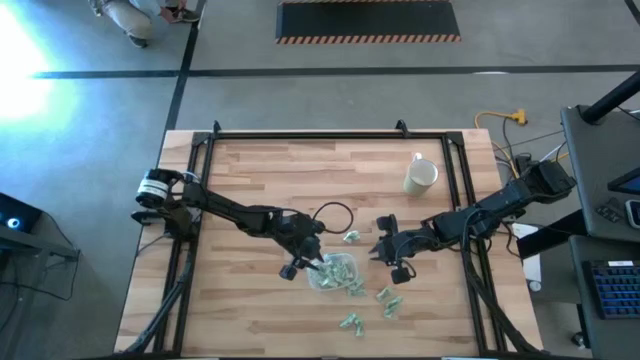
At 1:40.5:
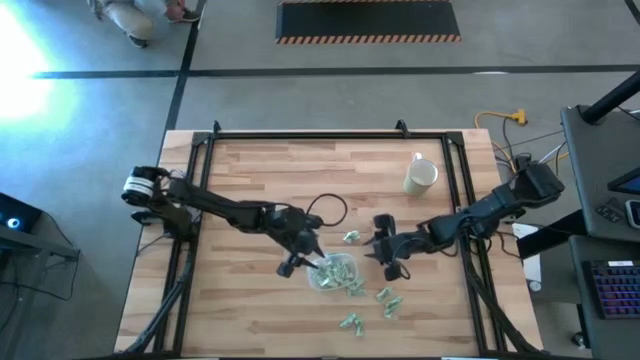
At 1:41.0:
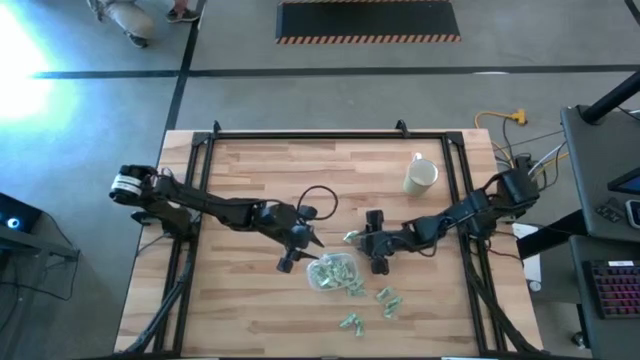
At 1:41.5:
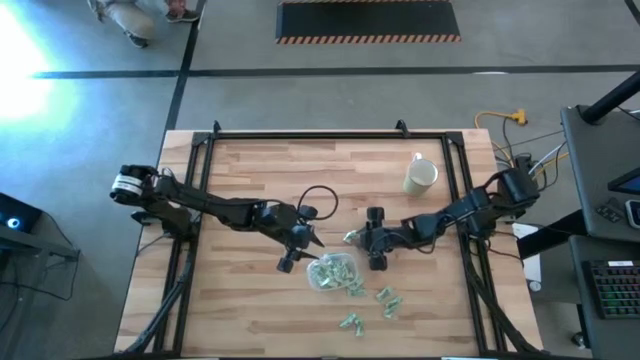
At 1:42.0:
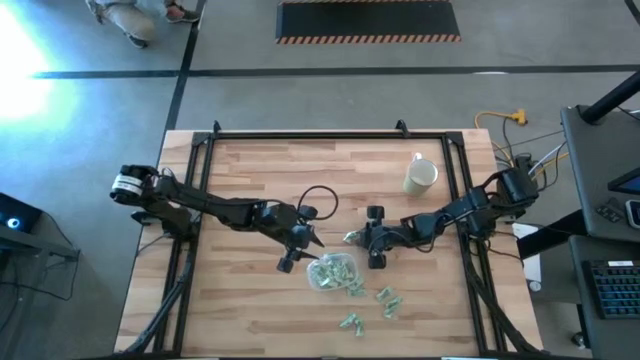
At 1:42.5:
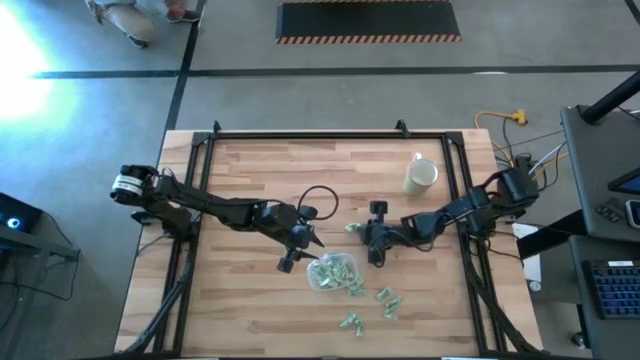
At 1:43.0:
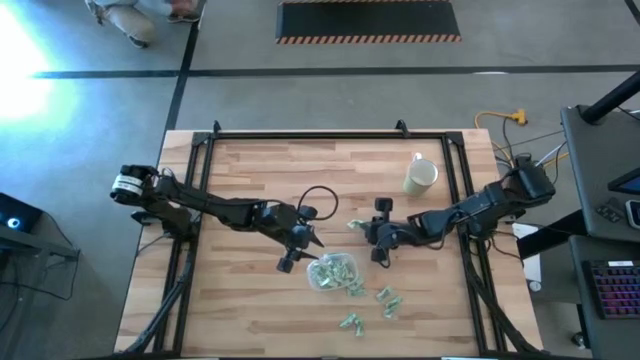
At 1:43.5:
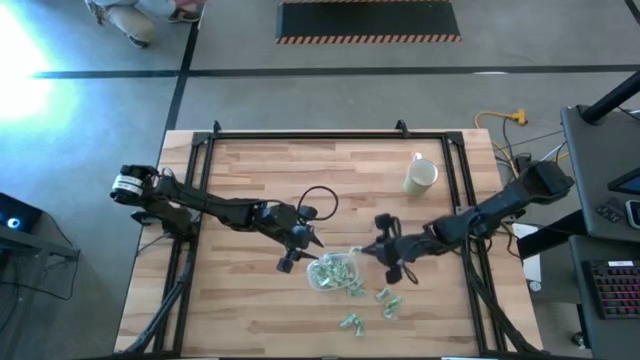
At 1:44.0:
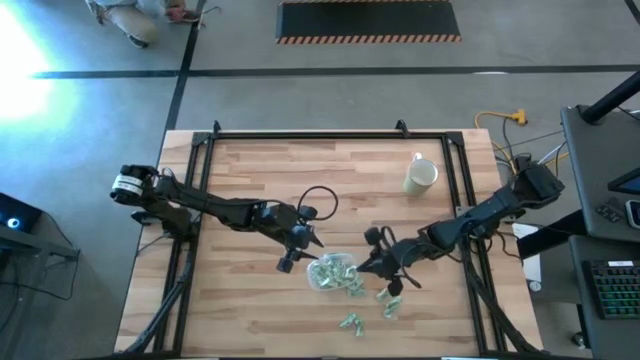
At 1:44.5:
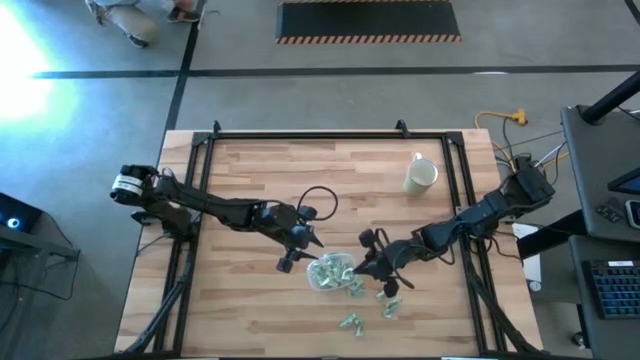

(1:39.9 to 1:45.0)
Task: Pick and place items into bin
Put the Stevia packet into the transparent bin

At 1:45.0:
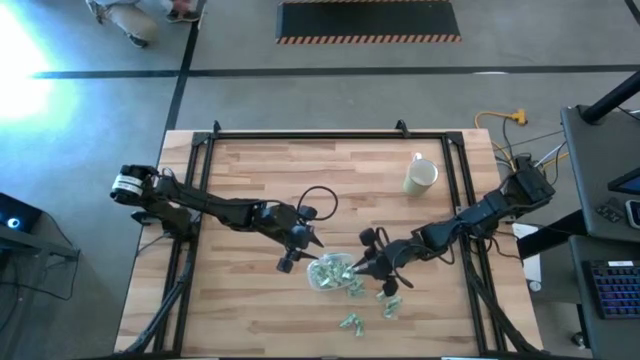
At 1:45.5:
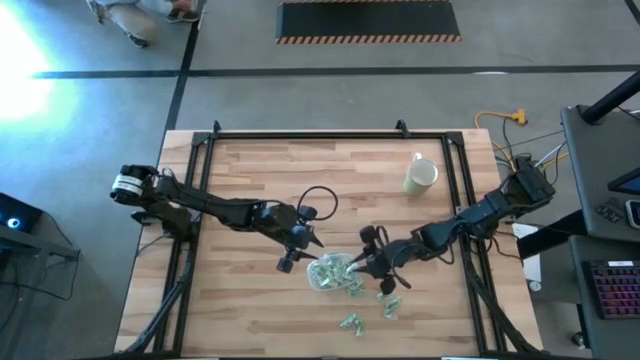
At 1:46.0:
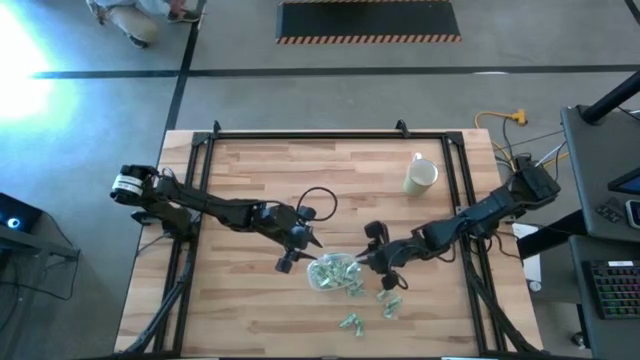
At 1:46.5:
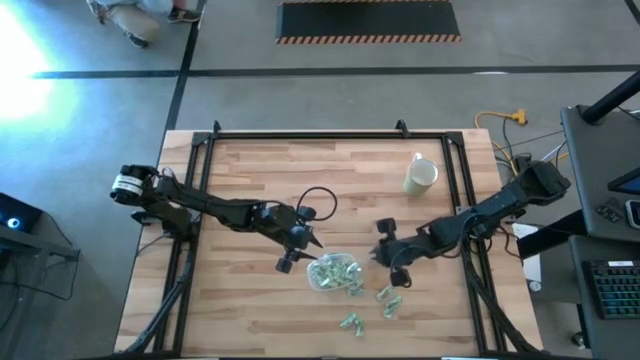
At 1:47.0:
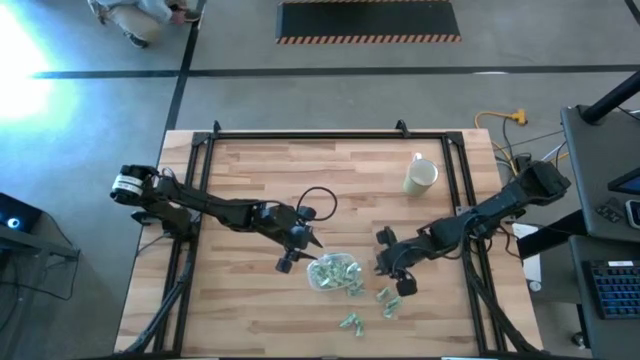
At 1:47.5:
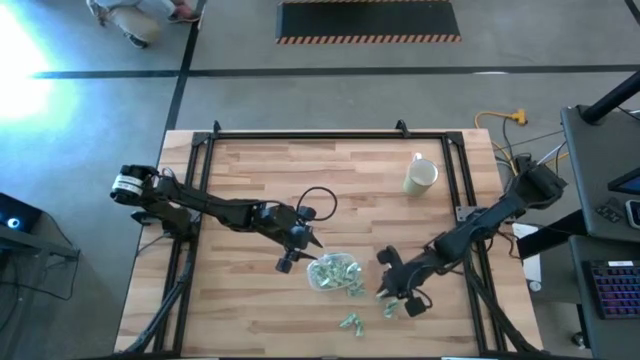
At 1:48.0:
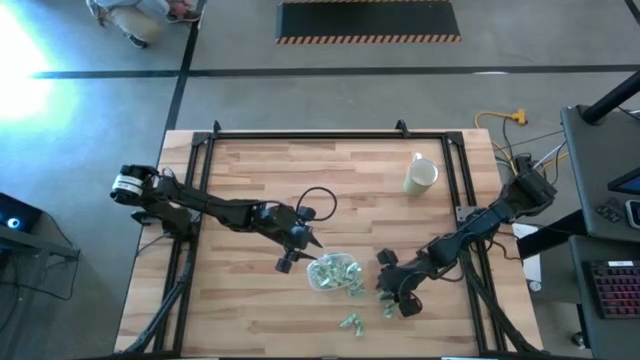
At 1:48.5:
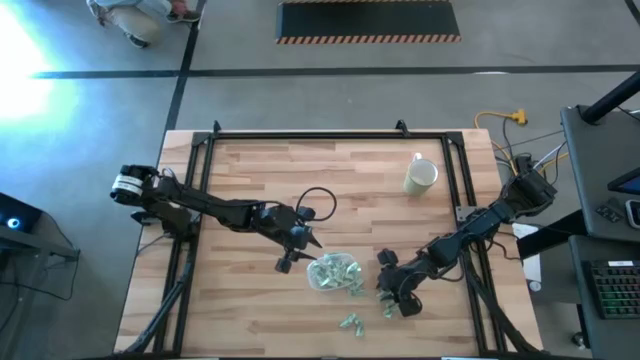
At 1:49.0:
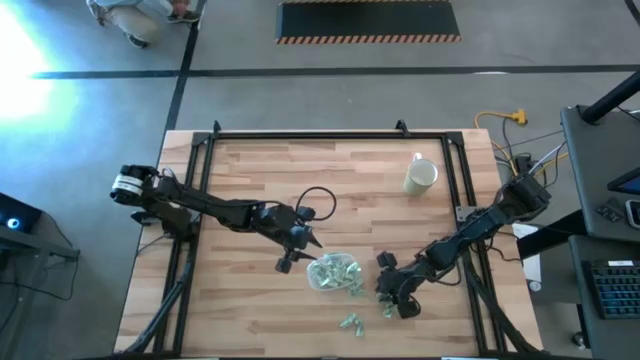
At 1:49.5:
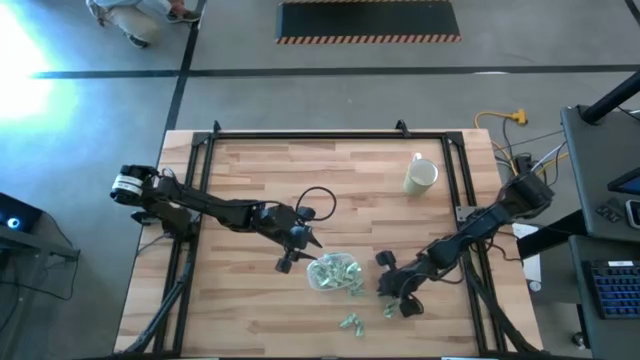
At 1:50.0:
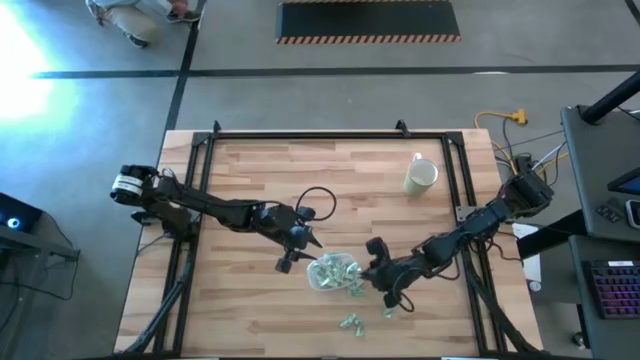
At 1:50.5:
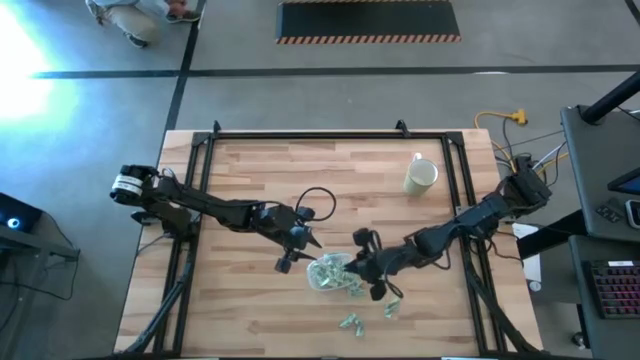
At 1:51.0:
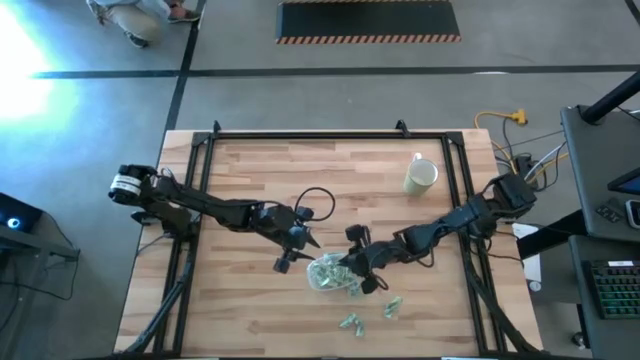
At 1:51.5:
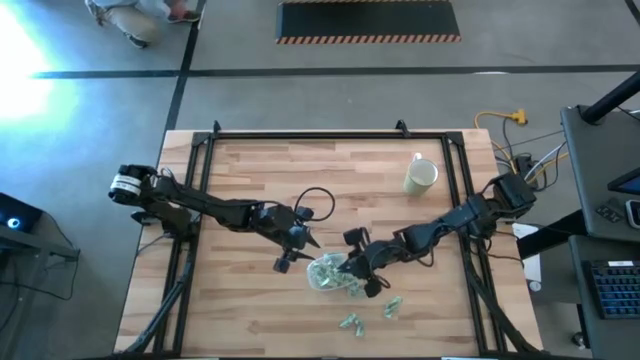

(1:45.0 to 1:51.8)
Put the Stevia packet into the transparent bin

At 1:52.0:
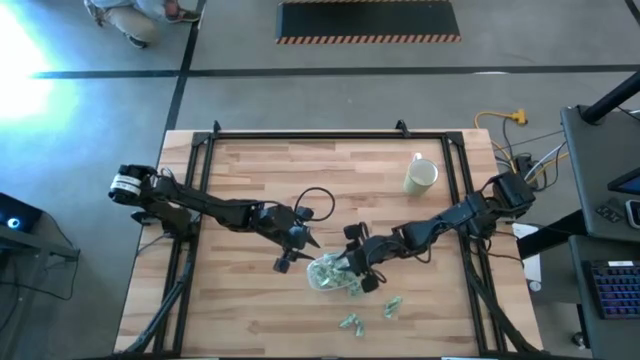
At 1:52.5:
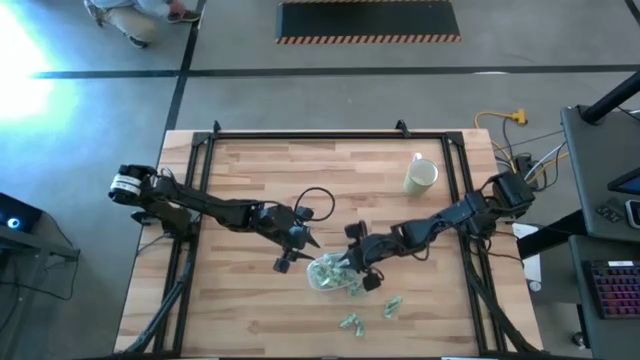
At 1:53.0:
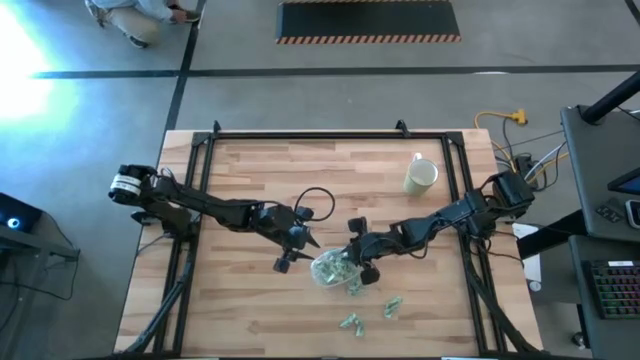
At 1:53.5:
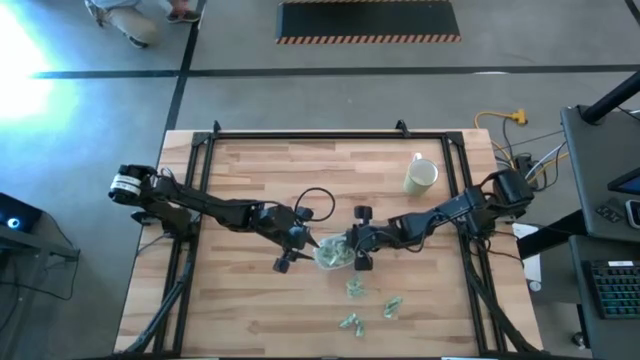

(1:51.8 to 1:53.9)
Adjust the transparent bin on the table

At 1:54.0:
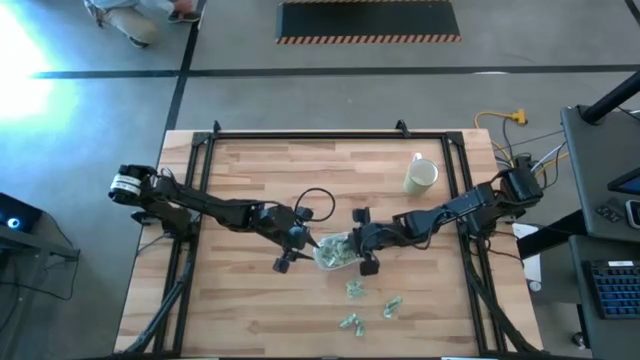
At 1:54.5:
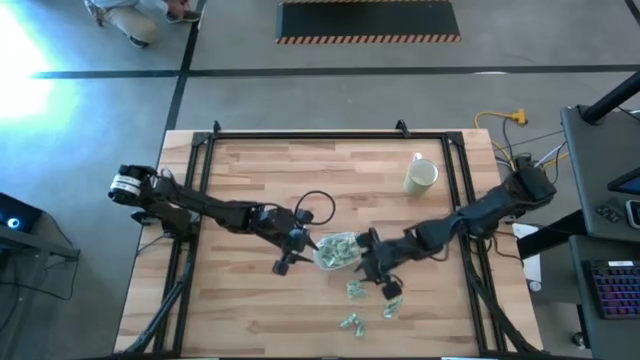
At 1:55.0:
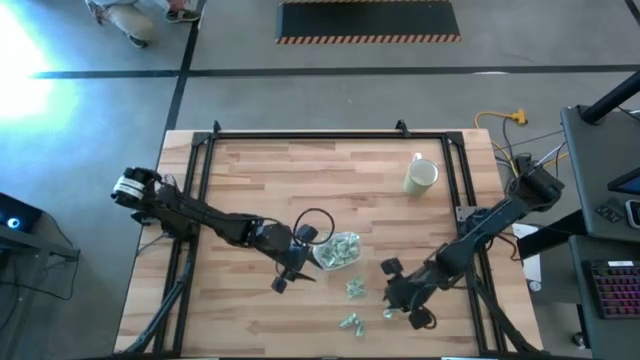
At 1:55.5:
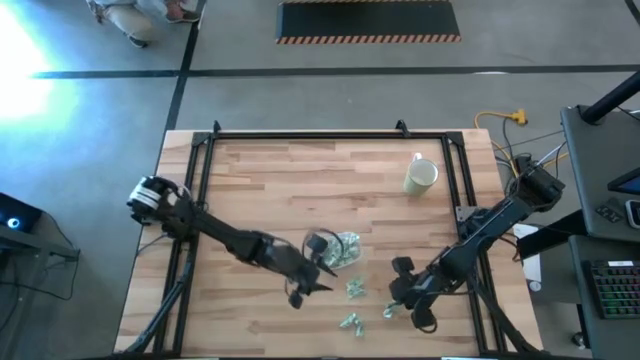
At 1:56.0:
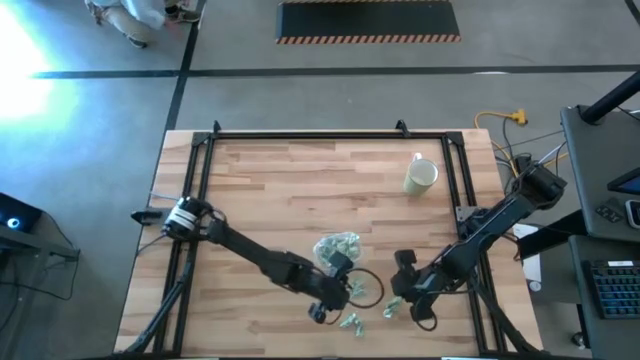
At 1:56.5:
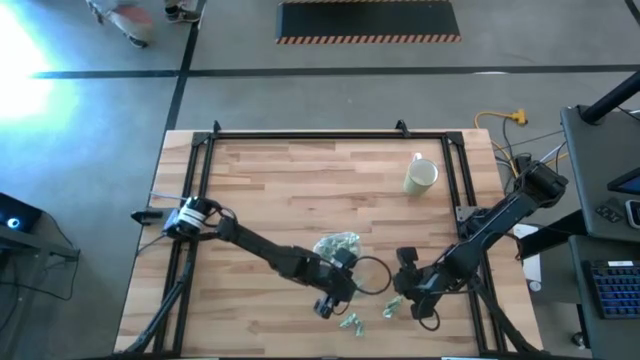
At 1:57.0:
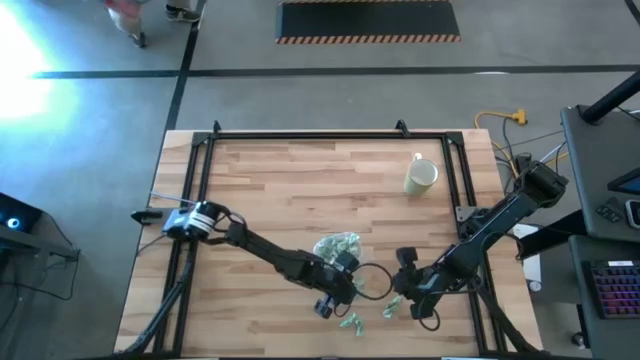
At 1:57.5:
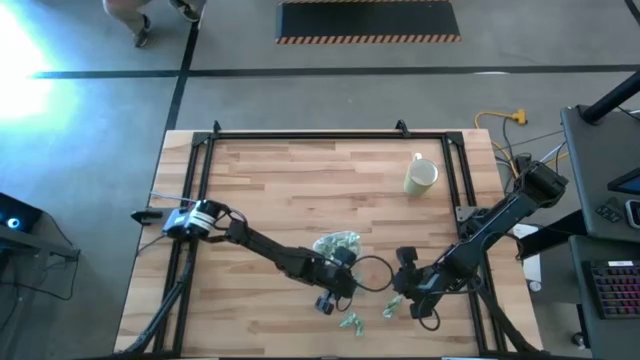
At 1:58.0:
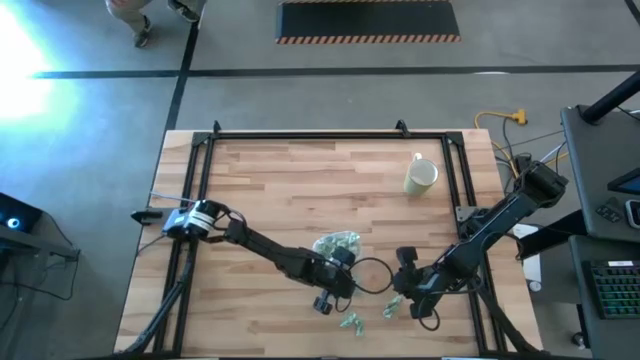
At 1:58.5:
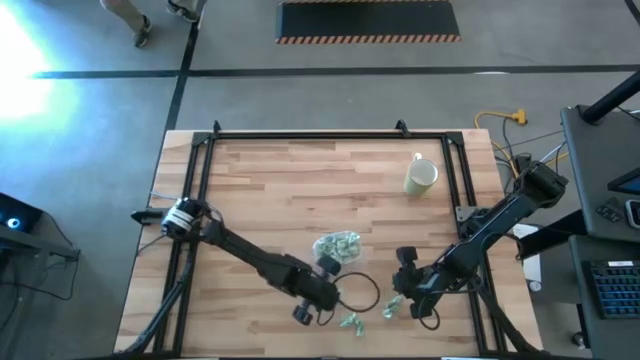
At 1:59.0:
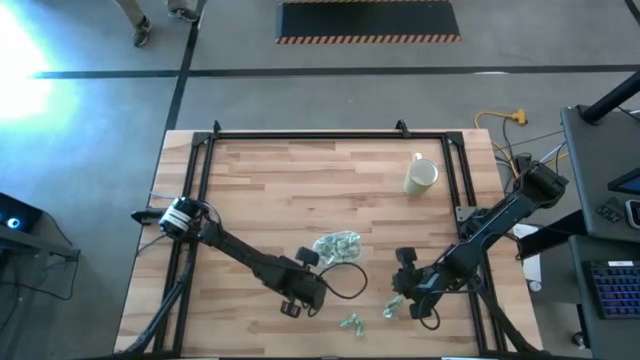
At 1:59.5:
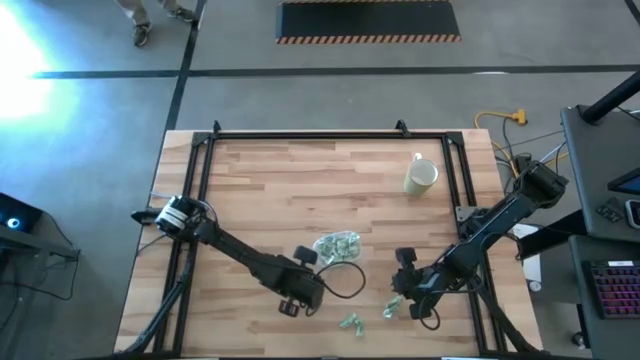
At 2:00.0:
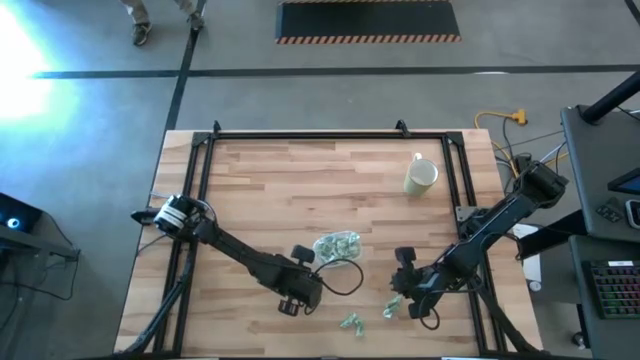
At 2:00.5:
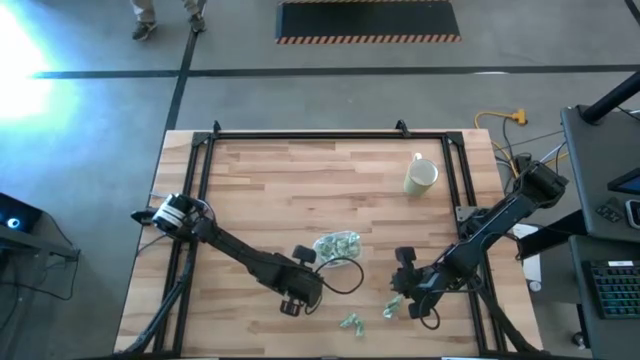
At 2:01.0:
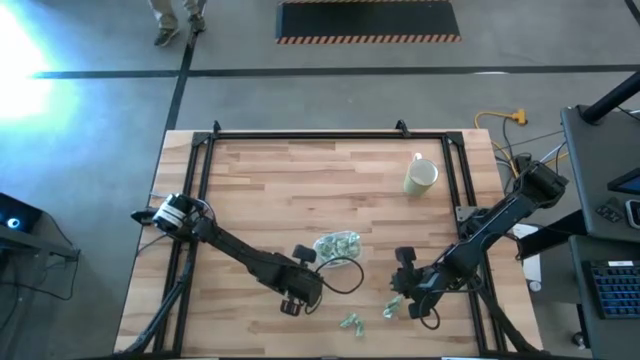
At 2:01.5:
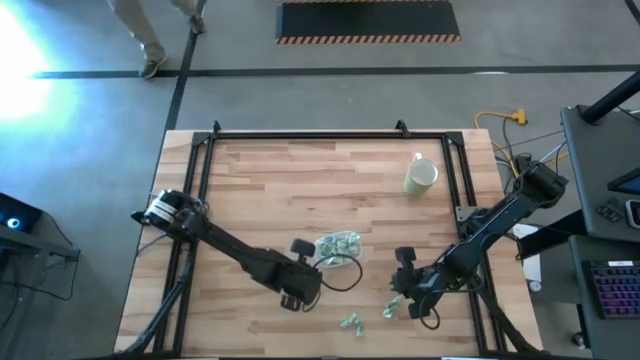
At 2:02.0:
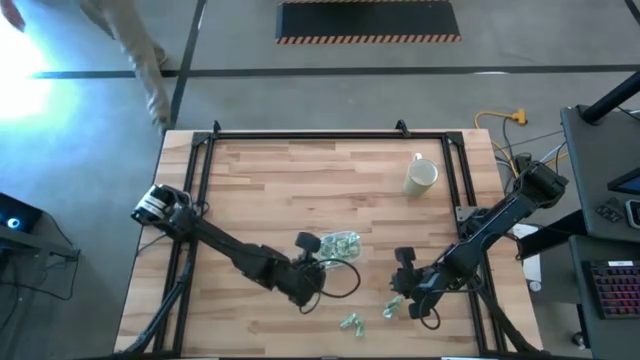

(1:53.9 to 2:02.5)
Put the Stevia packet into the transparent bin
